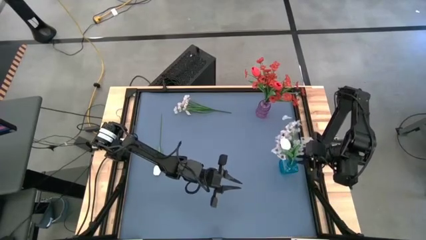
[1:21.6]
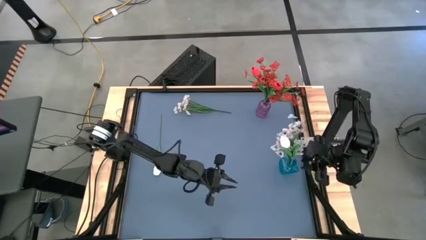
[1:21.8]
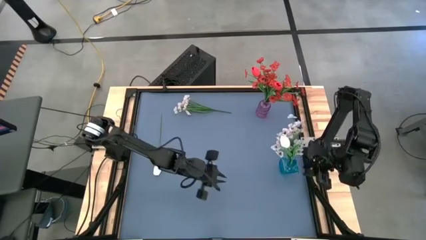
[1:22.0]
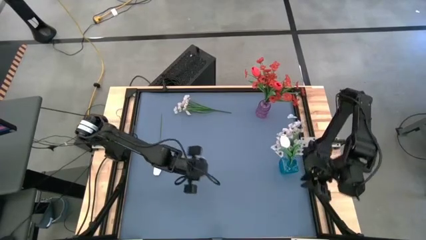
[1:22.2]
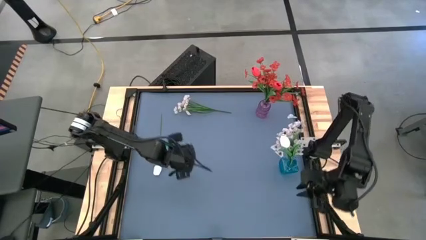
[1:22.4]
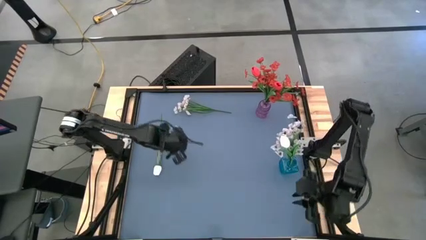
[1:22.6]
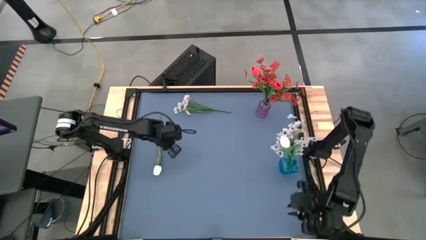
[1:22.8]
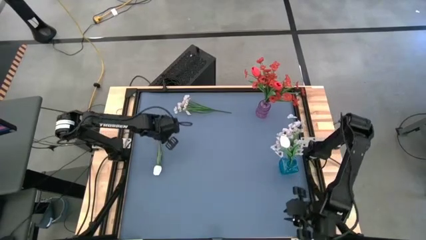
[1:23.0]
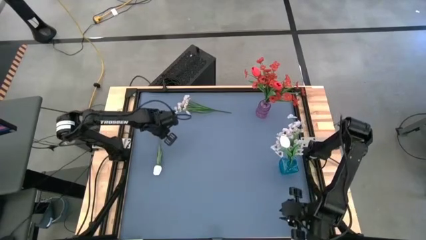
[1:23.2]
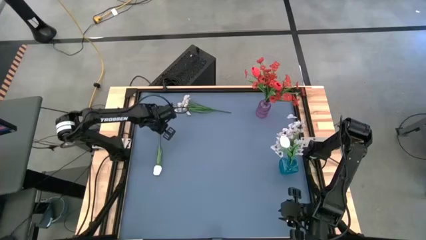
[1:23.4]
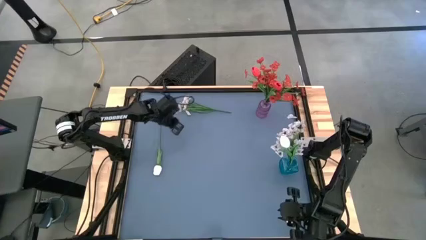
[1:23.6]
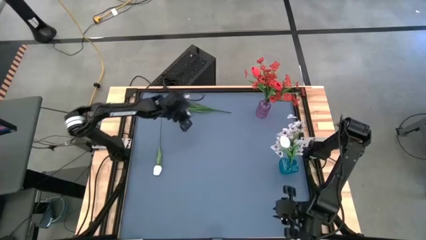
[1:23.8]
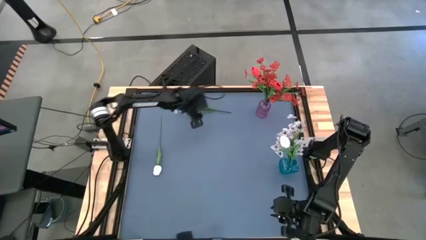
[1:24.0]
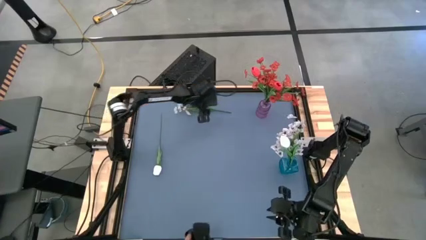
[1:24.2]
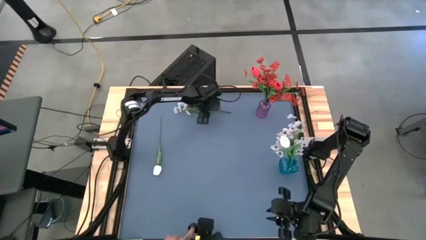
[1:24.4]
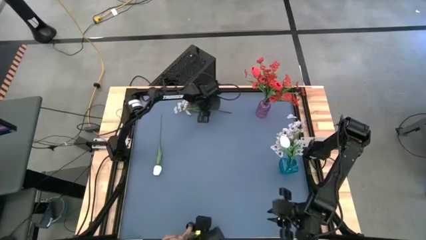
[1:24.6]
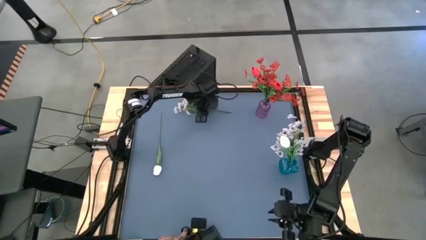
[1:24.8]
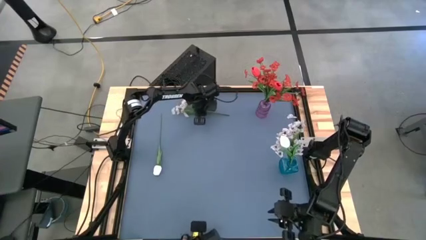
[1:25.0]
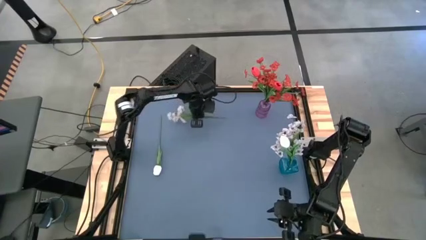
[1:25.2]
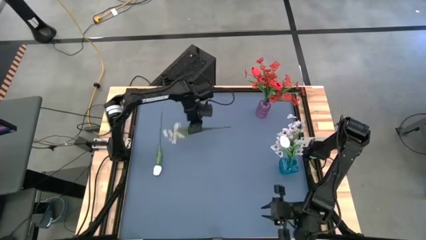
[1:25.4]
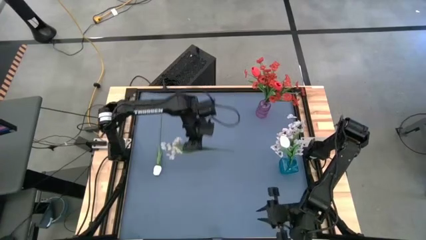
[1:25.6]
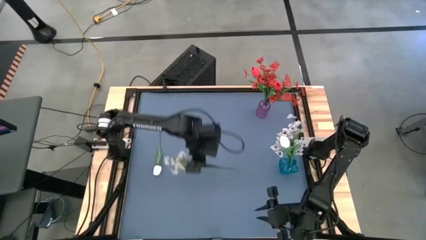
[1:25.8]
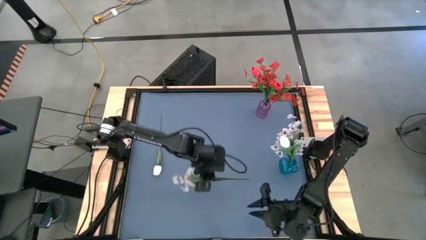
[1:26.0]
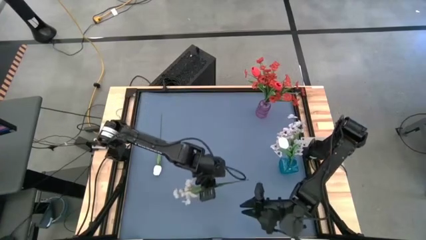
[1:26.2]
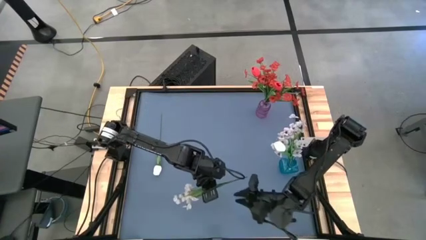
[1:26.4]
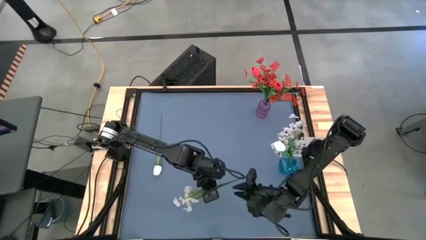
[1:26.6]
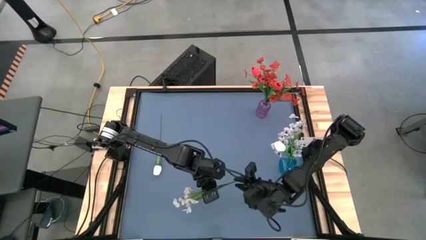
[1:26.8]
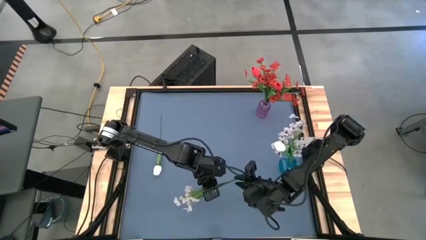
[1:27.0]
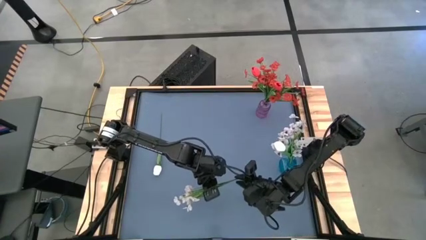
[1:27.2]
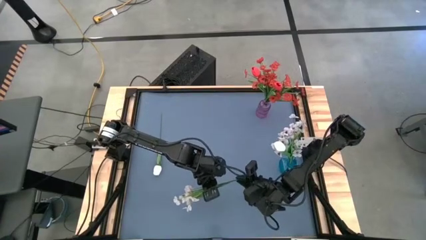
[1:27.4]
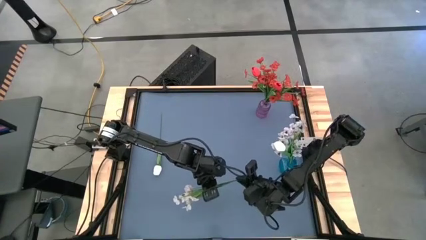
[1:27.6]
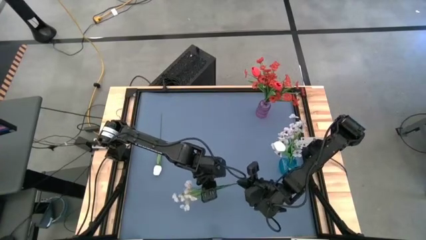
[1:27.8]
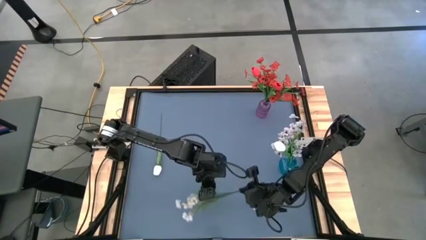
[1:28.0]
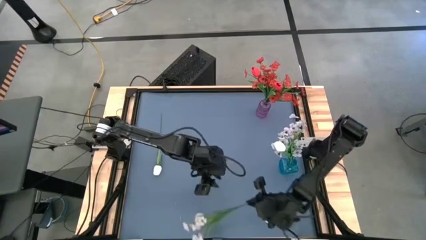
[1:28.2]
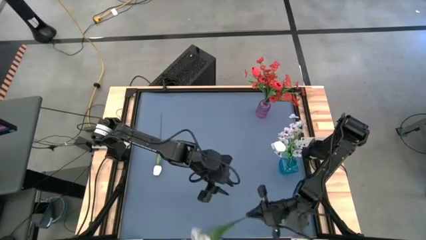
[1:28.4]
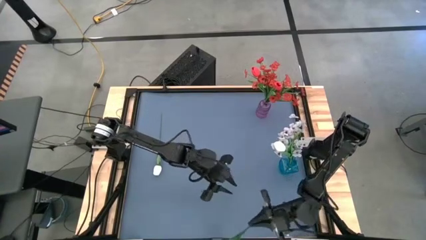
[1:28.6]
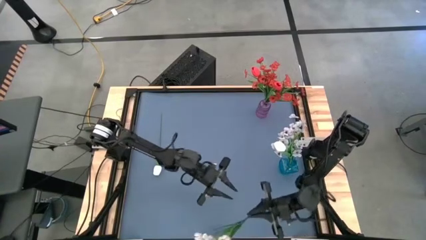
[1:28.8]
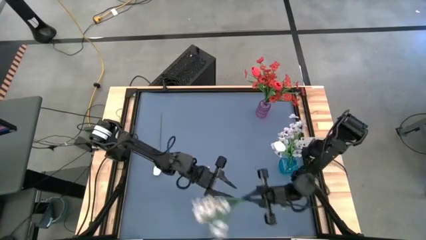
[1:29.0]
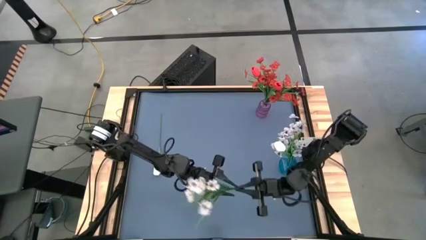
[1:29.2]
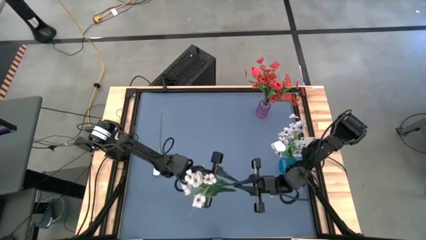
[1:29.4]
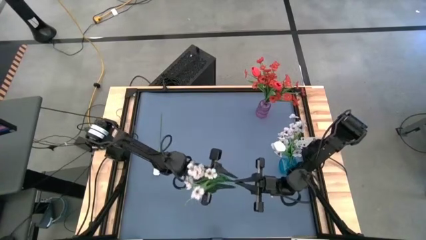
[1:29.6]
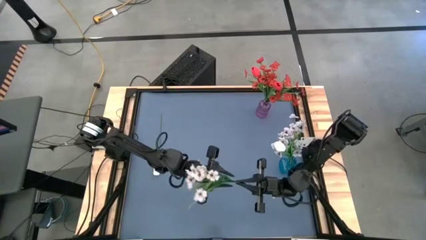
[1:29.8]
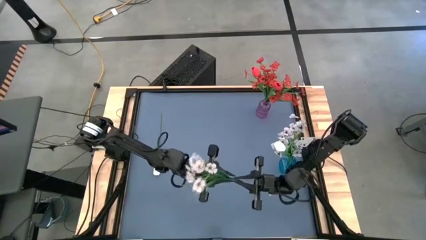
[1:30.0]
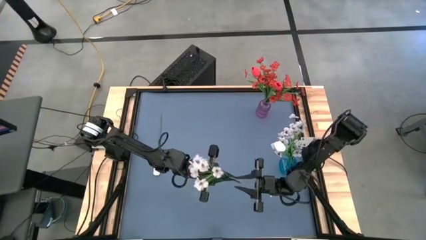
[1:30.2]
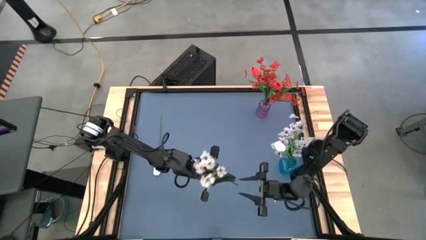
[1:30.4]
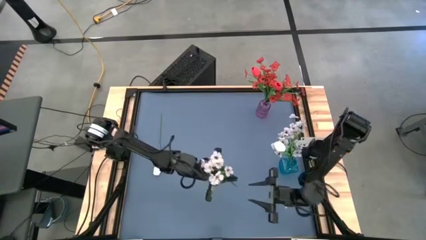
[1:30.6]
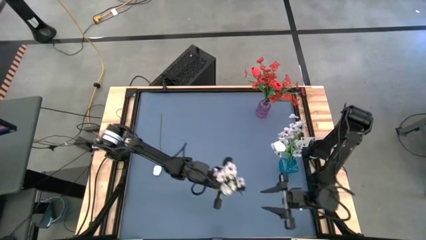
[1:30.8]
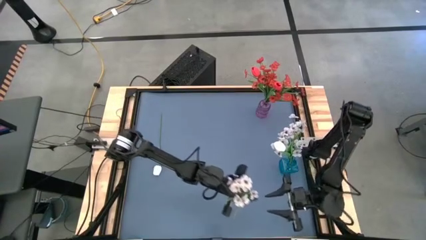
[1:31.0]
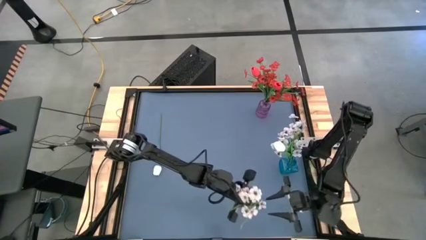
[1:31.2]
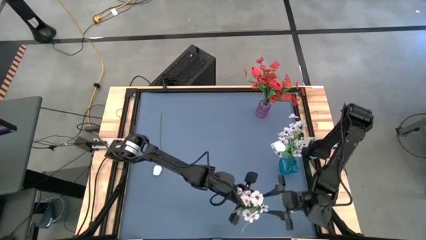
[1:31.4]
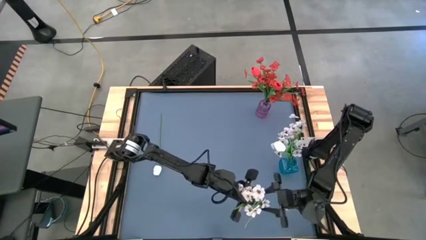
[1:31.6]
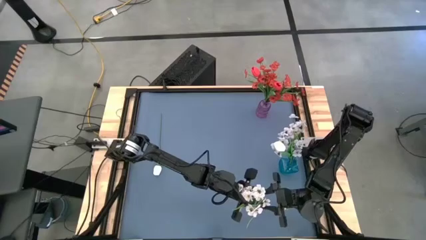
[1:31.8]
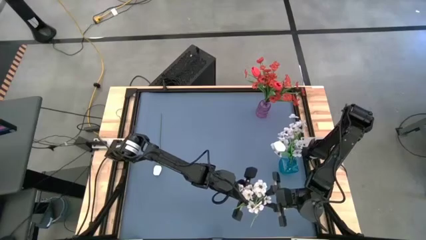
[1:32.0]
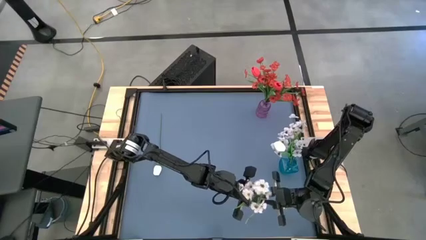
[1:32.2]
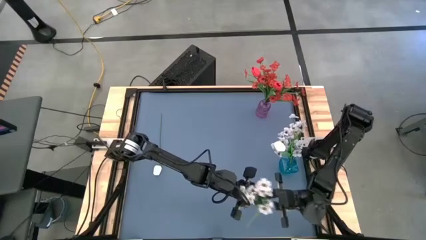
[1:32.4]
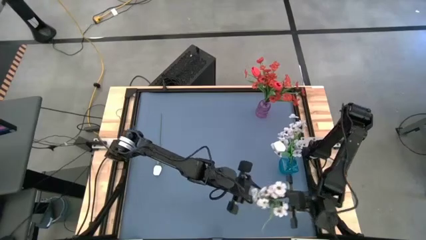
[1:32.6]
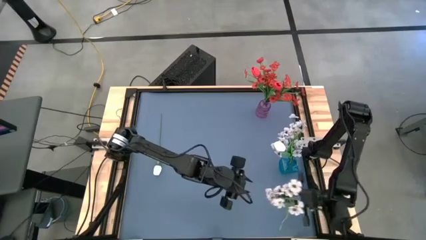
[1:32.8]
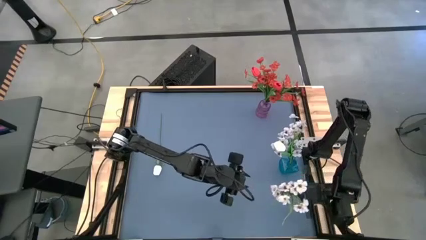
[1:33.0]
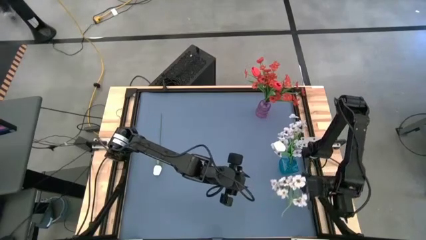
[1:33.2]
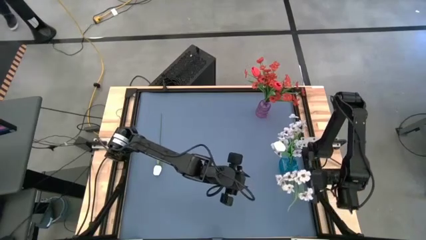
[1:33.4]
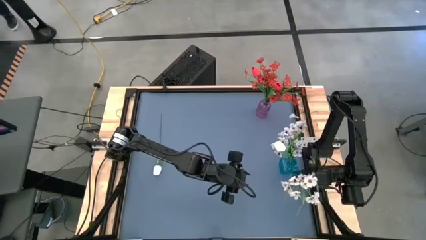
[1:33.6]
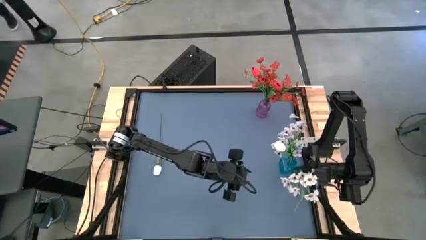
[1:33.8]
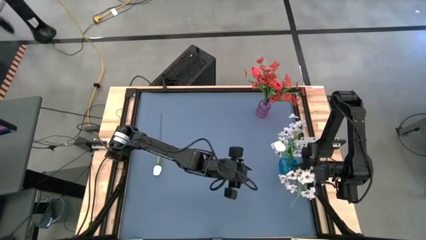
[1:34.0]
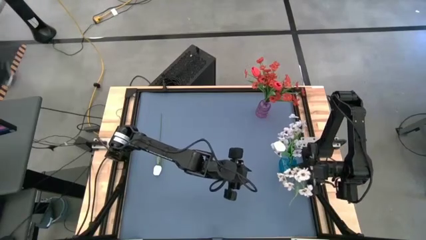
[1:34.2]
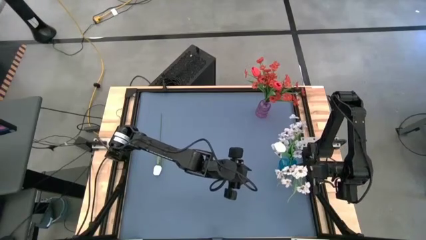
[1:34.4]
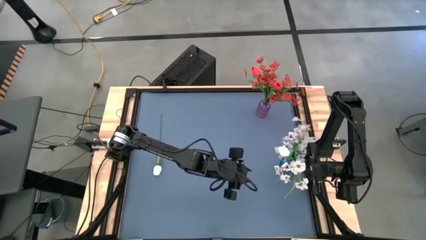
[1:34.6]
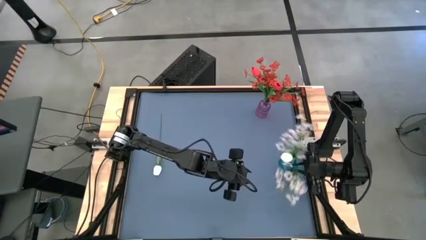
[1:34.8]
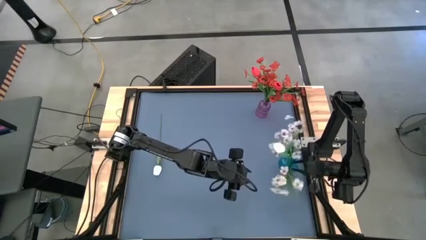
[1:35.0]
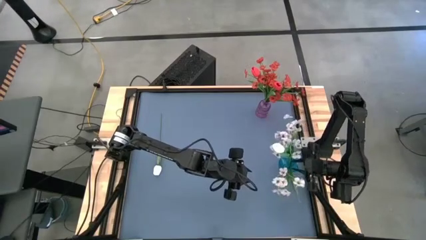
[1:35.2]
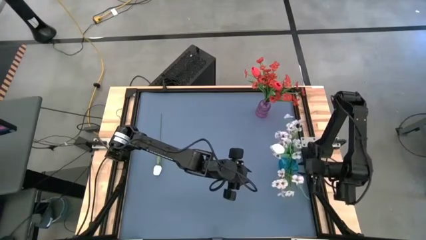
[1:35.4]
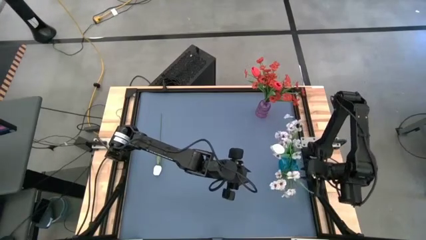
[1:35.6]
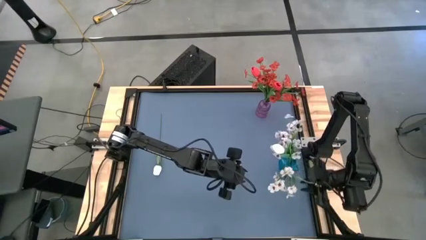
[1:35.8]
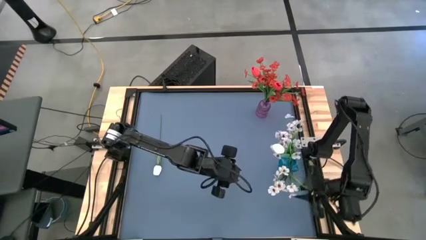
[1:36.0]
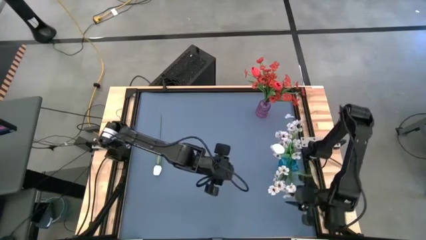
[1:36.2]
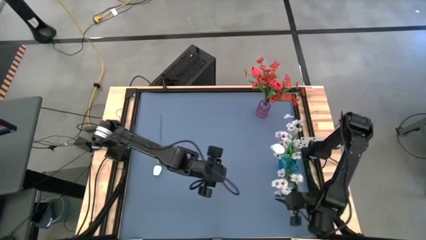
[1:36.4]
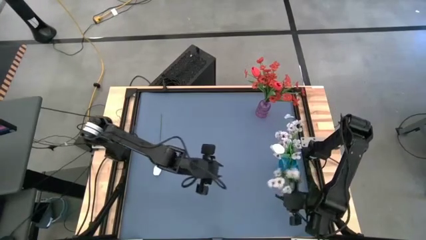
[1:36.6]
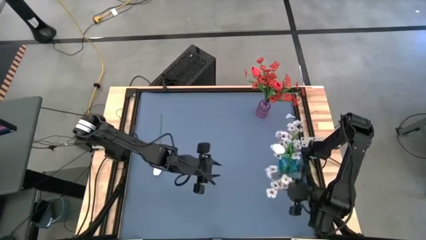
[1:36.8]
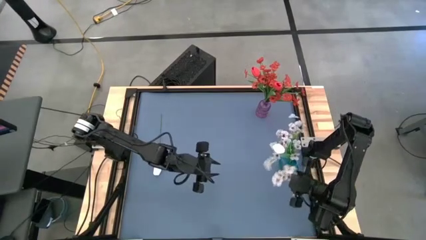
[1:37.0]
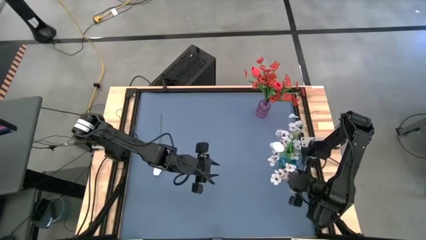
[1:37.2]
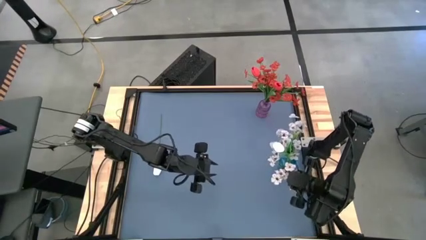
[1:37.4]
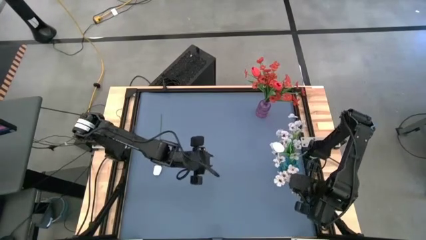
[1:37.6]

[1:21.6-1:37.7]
Task: Sort flowers into vase by color
Put the white flowers into the blue vase

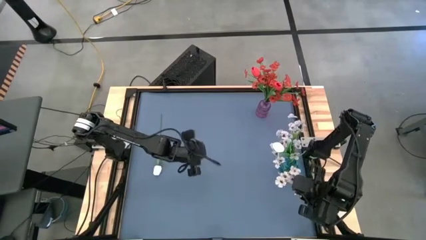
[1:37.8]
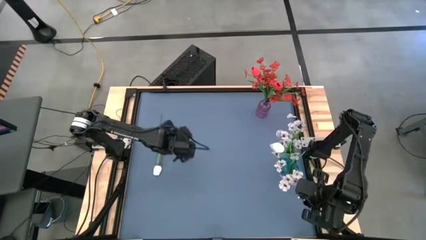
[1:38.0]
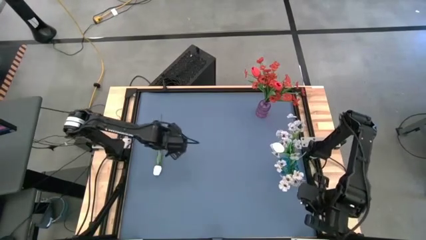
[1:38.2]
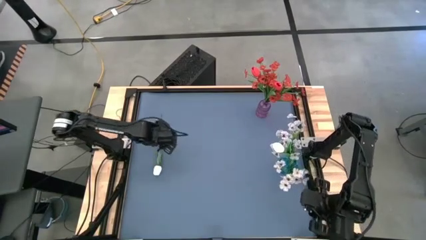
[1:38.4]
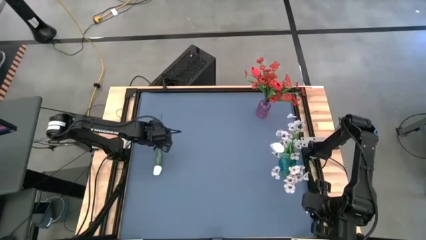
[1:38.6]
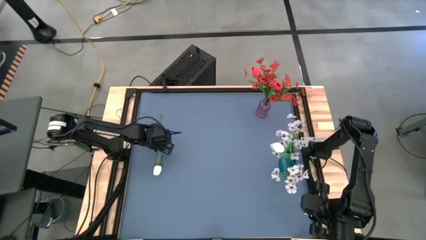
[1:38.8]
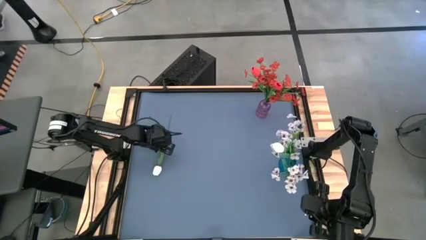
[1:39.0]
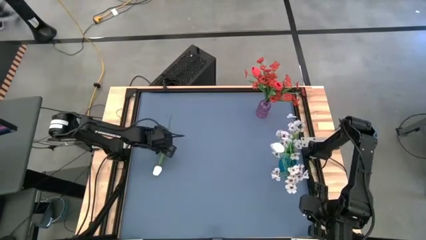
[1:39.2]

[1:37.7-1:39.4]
Put the white tulip into the blue vase
